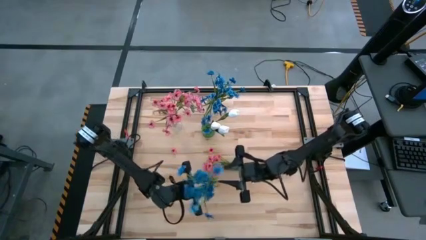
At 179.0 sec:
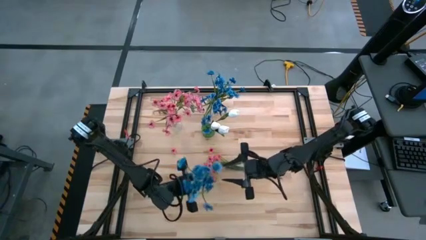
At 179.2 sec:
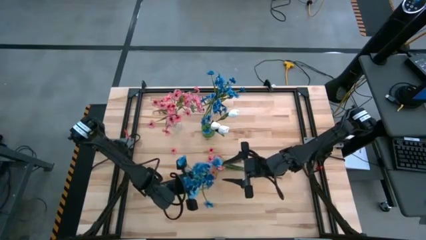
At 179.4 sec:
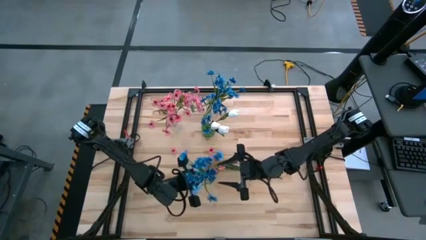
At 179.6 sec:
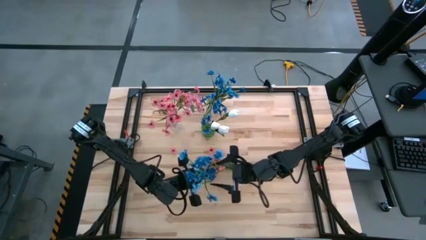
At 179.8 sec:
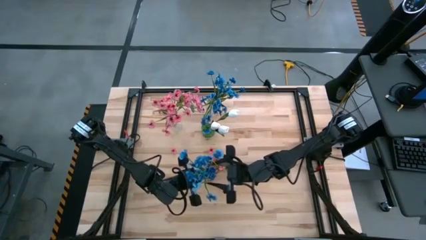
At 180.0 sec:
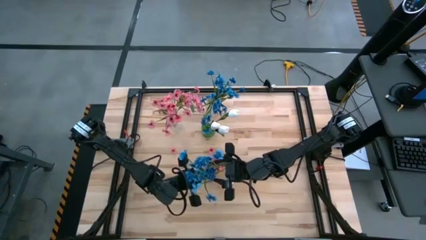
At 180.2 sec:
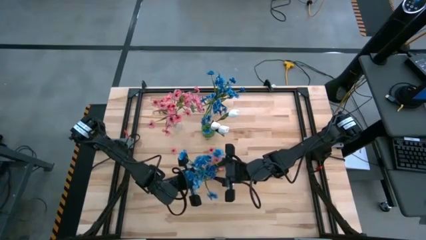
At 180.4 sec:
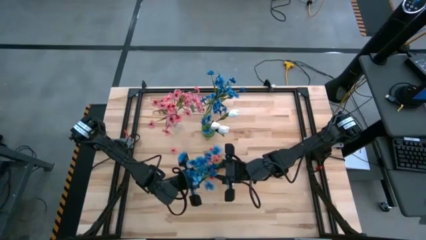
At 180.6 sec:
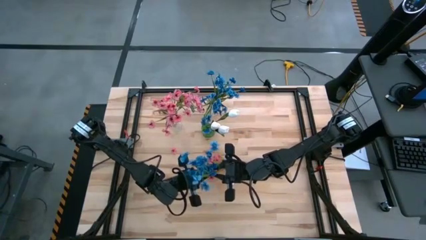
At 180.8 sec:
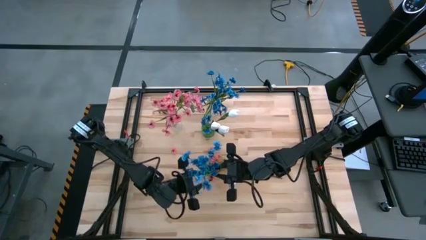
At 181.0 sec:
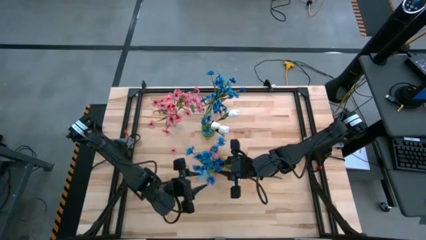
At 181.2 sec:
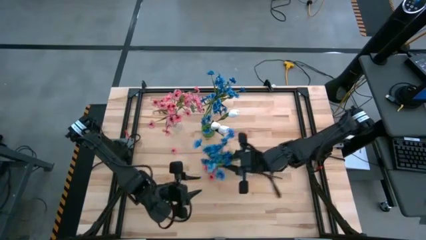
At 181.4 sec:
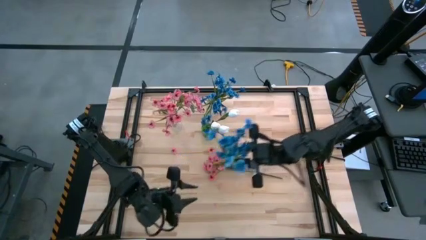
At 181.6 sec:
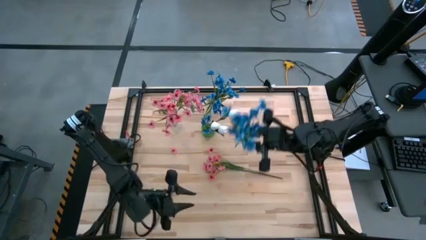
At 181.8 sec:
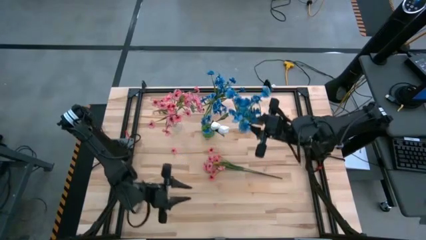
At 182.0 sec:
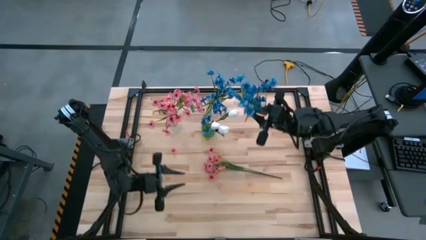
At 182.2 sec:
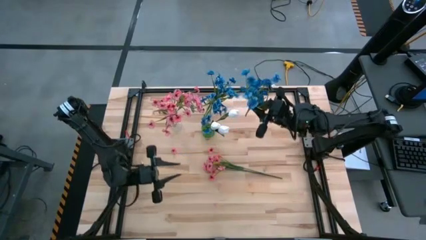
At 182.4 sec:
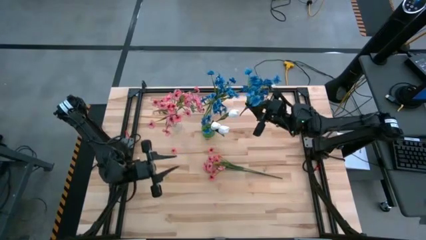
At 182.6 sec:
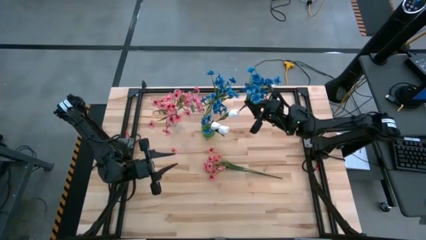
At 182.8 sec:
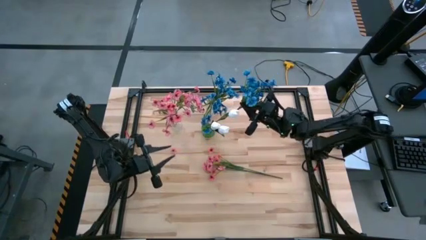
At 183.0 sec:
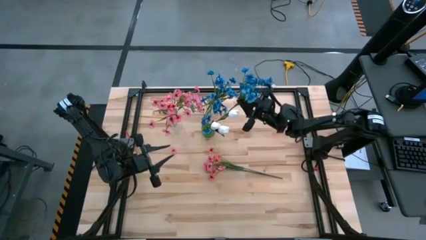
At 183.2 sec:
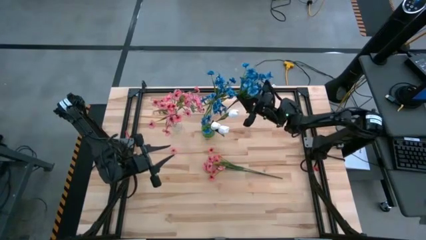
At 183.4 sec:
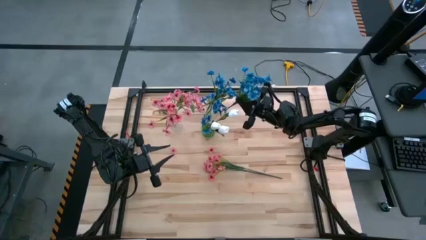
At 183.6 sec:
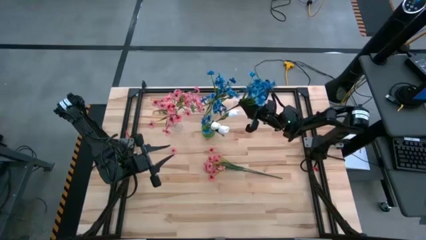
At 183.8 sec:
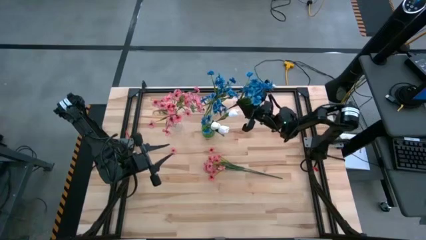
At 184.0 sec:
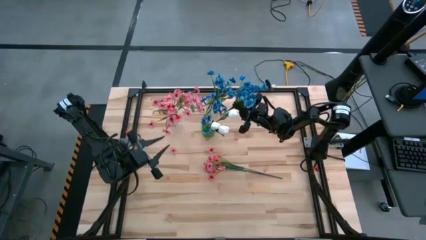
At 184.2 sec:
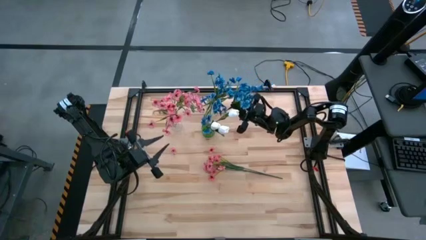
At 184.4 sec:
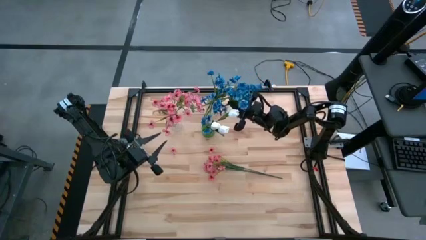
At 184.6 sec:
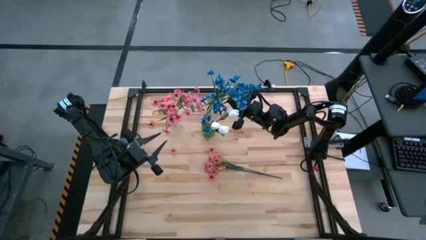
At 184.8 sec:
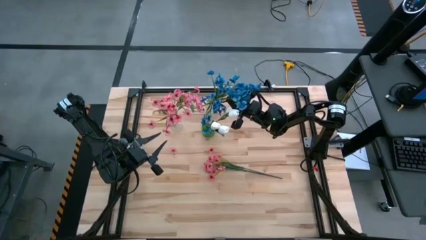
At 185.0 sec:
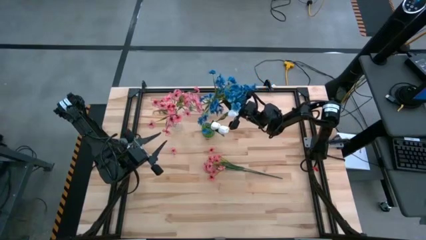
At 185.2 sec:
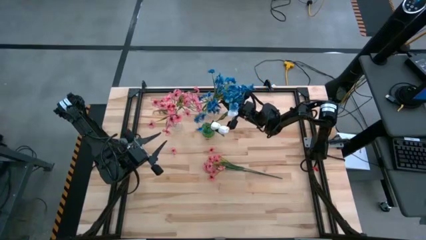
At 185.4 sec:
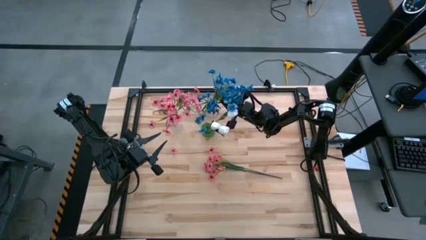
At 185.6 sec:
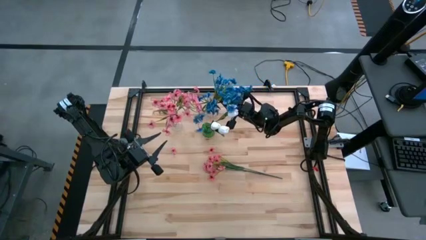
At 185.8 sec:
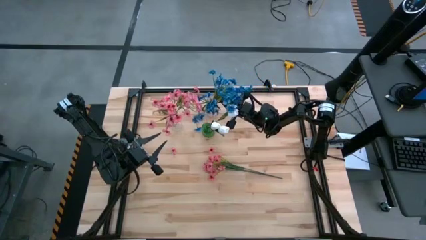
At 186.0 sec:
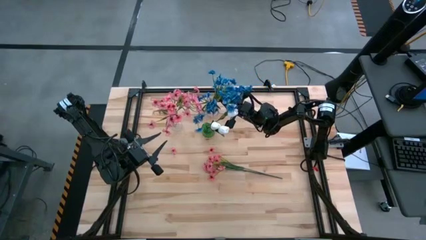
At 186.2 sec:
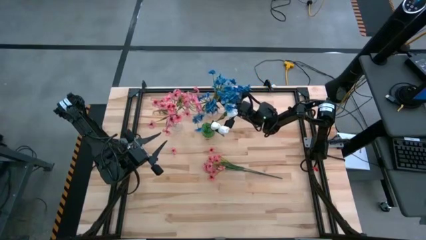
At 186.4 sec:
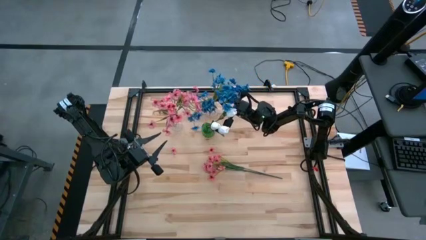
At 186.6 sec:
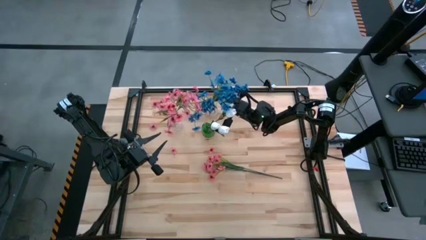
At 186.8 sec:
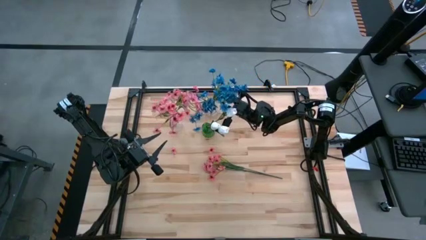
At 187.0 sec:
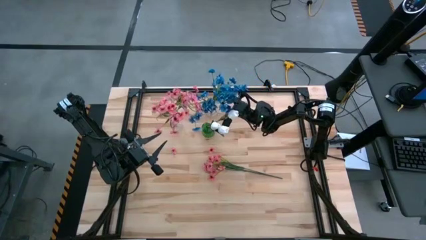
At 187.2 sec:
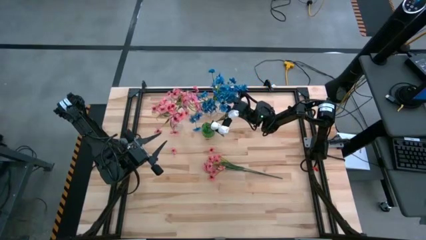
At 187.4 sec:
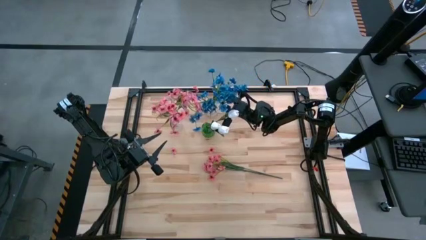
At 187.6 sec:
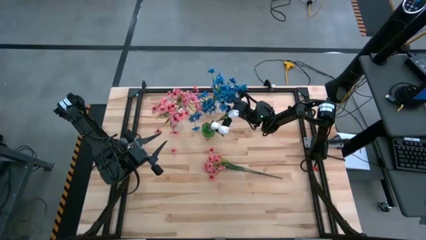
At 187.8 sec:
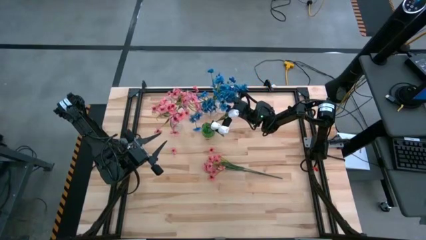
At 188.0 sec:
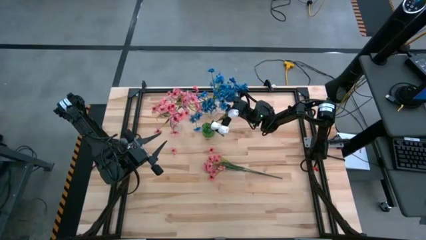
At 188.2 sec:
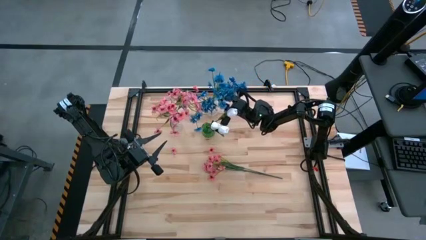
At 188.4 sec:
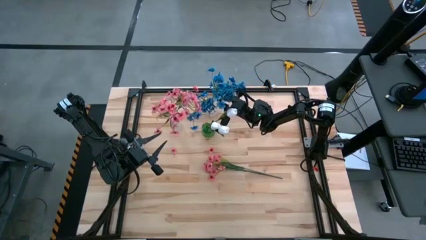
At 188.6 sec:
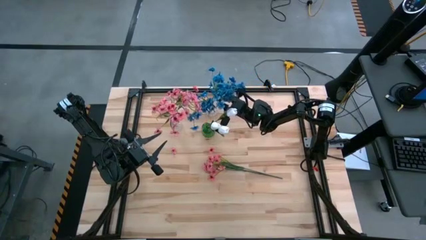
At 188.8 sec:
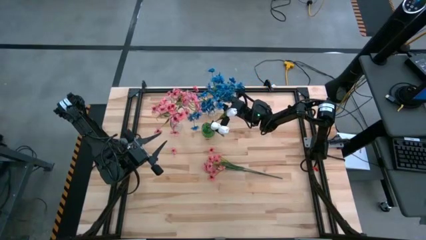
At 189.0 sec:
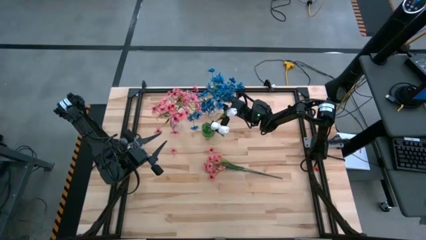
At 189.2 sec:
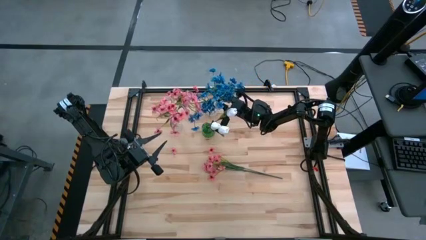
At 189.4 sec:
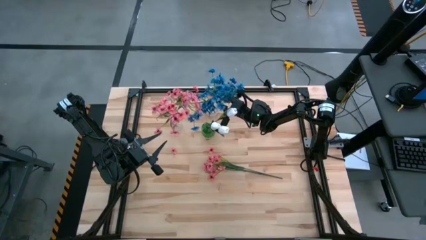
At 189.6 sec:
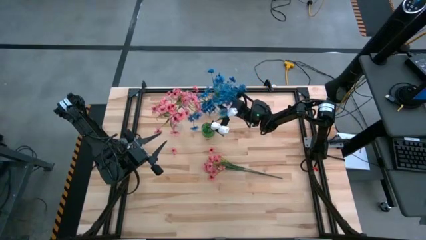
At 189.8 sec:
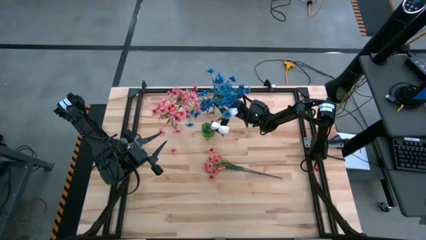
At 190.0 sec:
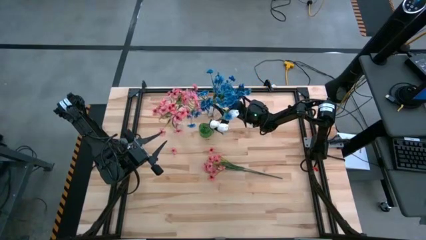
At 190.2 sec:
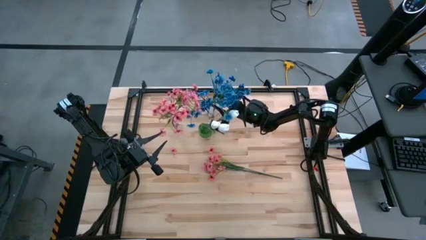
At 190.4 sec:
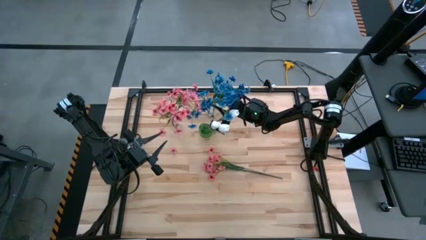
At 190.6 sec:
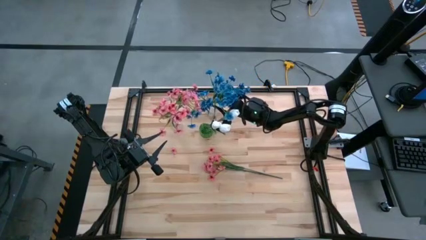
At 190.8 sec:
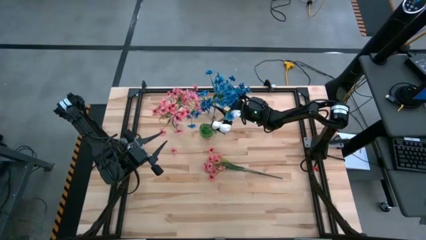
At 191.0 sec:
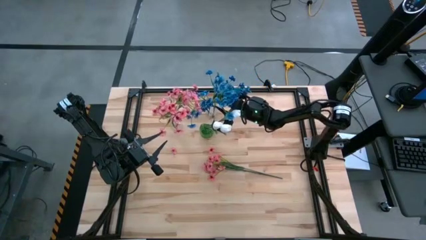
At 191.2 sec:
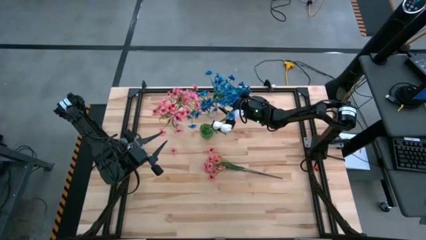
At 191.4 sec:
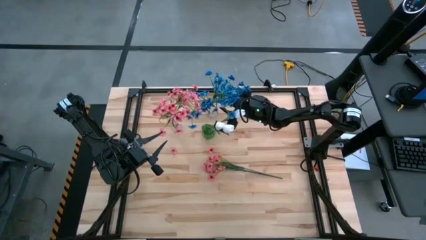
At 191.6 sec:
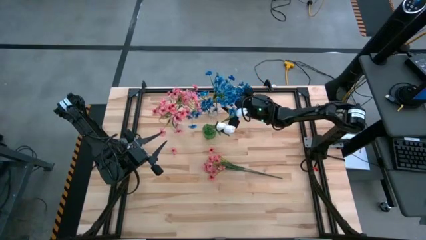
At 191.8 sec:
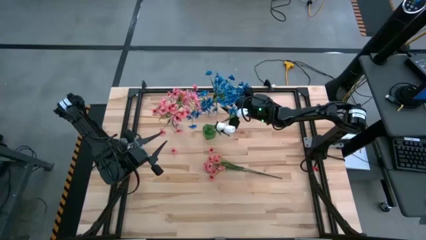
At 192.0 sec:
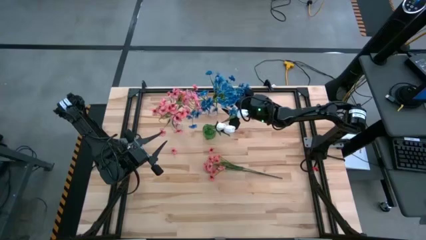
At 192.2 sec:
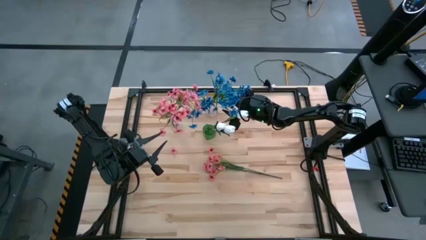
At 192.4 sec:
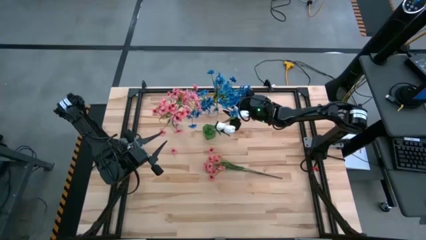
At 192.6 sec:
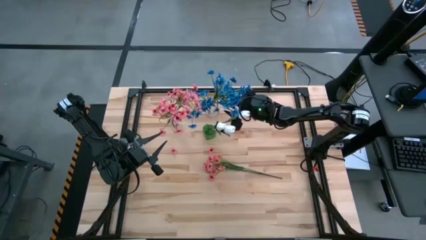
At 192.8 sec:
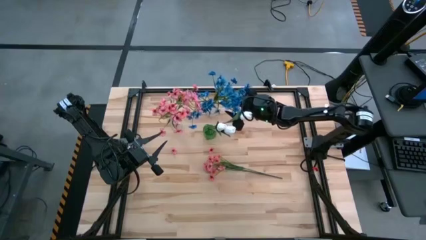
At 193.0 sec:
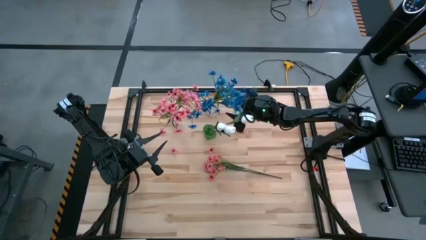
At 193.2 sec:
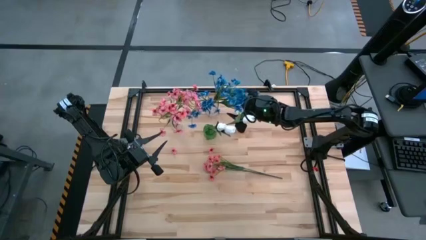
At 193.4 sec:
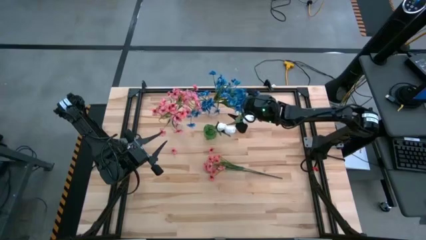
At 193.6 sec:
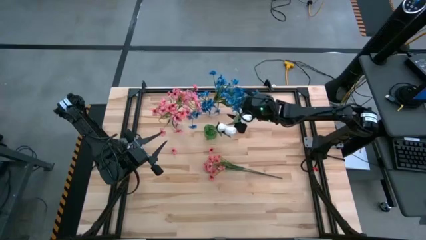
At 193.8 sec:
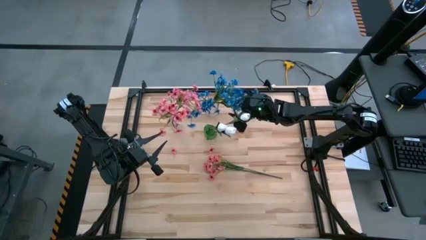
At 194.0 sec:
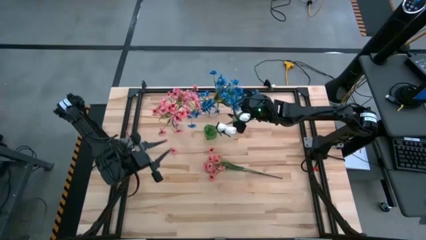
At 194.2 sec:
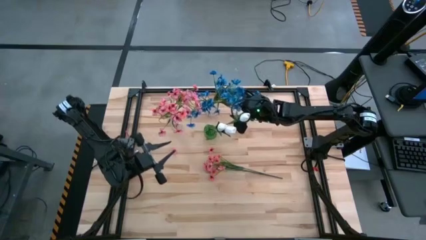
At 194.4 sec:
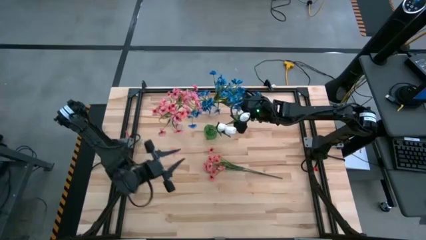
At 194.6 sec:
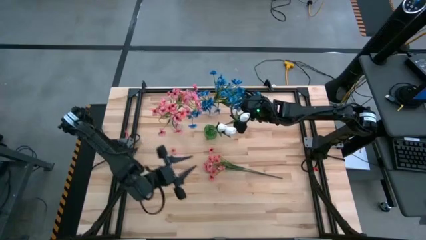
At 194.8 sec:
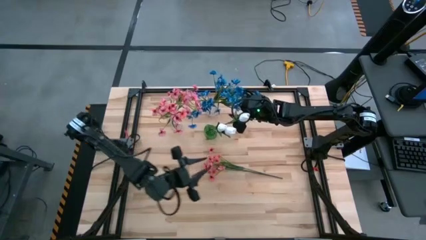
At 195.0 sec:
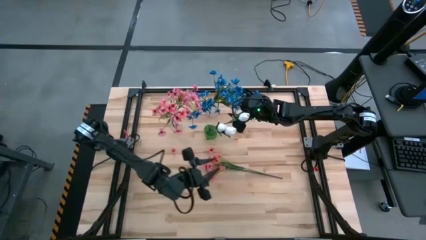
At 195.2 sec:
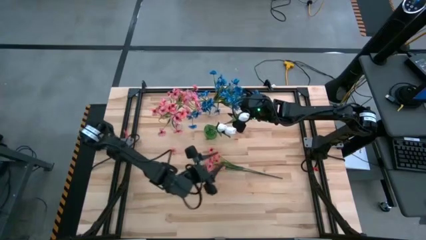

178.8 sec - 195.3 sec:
Task: Sort flowers into vase by color
Put the blue flowers into the right transparent vase
